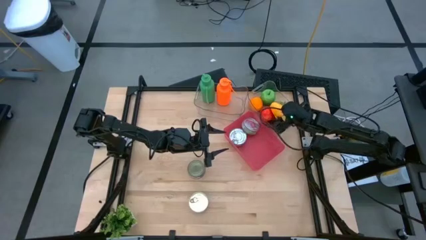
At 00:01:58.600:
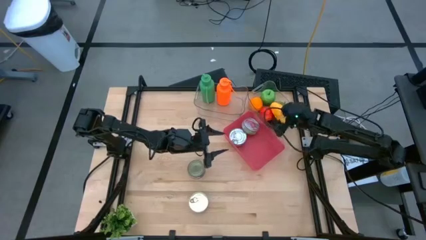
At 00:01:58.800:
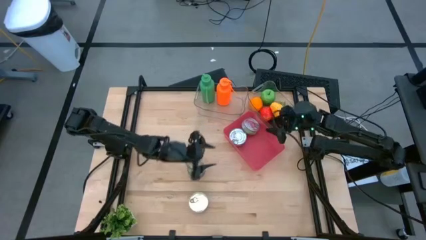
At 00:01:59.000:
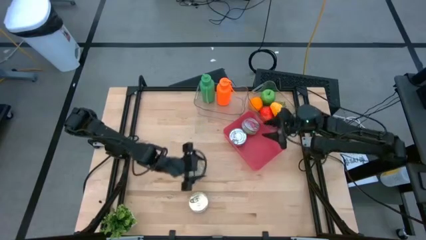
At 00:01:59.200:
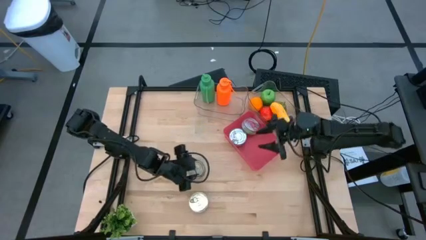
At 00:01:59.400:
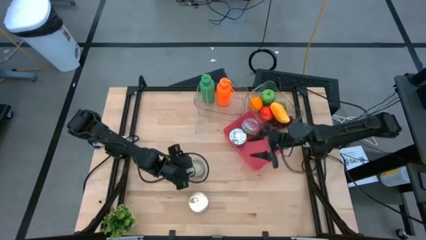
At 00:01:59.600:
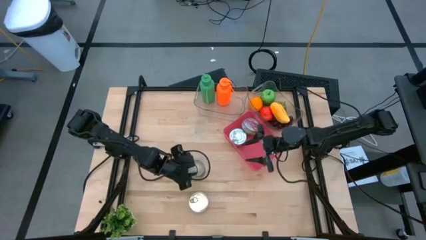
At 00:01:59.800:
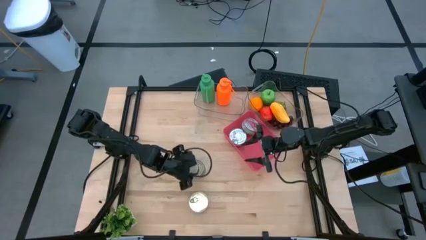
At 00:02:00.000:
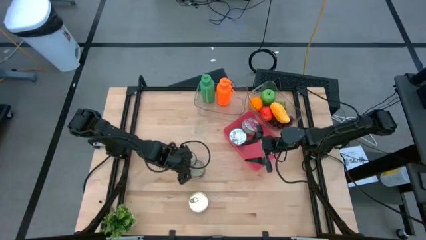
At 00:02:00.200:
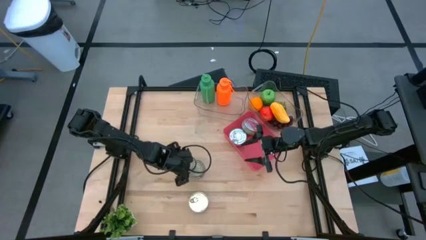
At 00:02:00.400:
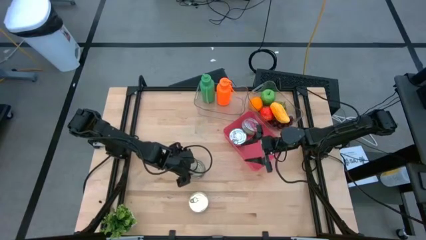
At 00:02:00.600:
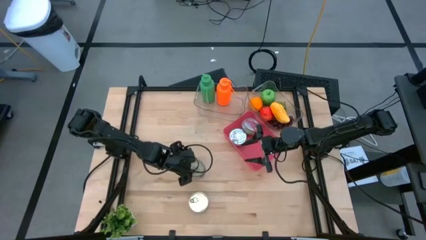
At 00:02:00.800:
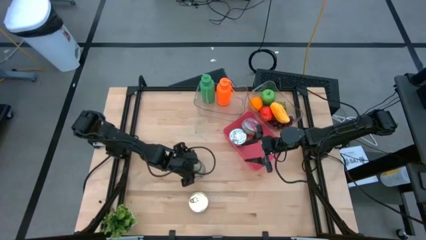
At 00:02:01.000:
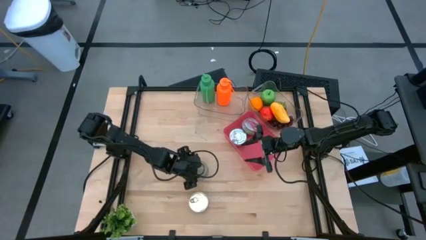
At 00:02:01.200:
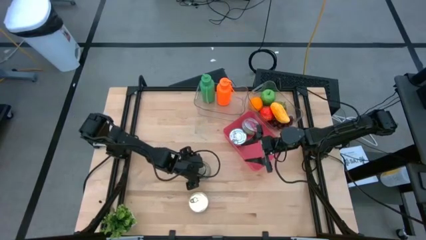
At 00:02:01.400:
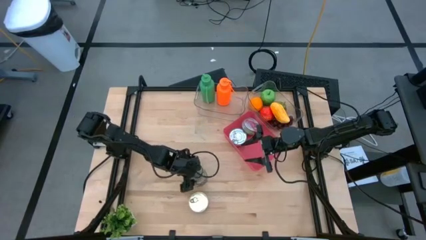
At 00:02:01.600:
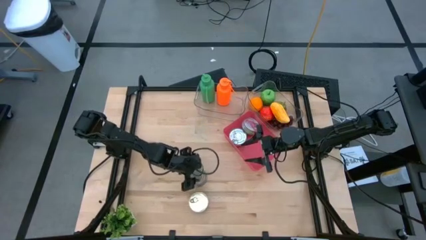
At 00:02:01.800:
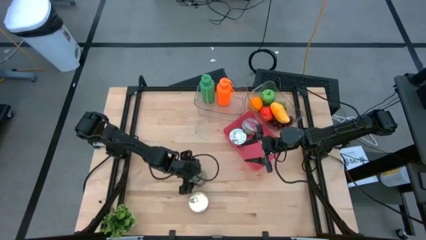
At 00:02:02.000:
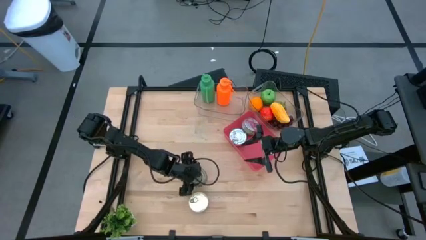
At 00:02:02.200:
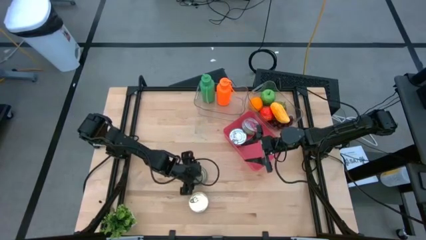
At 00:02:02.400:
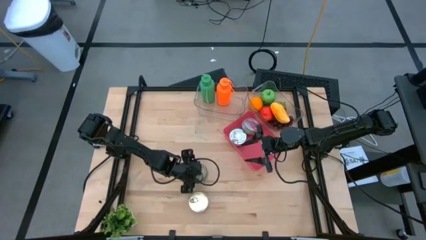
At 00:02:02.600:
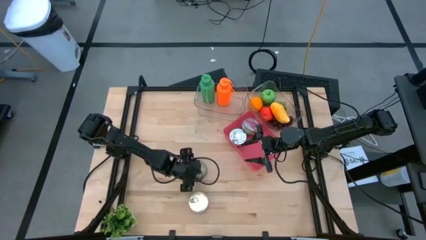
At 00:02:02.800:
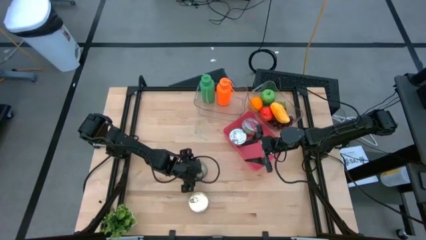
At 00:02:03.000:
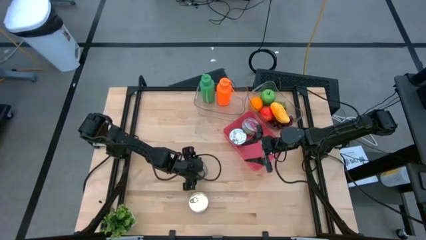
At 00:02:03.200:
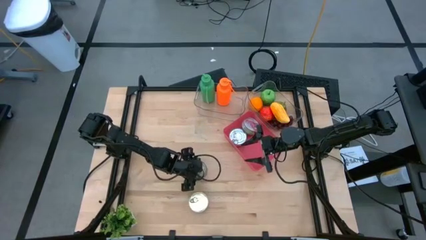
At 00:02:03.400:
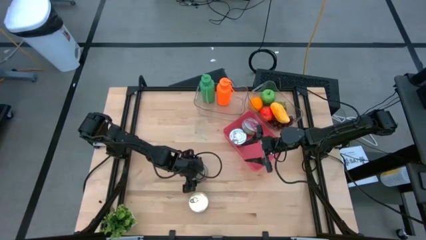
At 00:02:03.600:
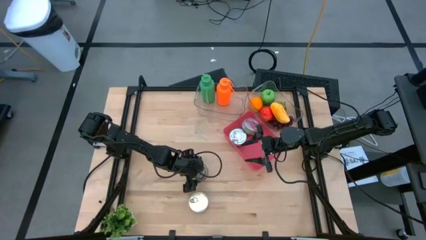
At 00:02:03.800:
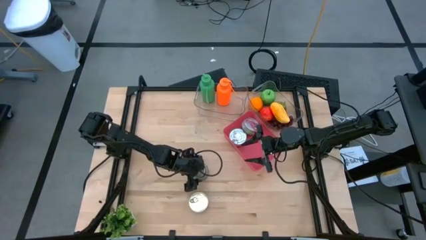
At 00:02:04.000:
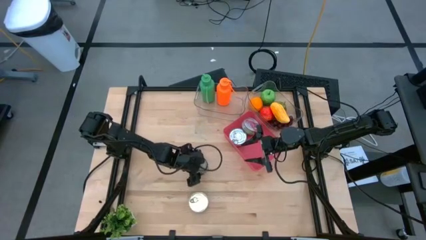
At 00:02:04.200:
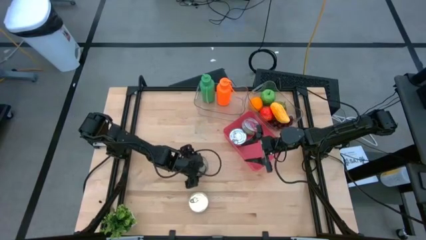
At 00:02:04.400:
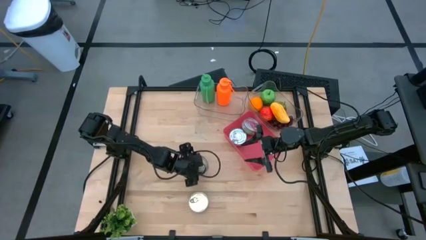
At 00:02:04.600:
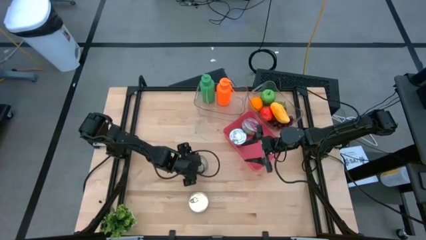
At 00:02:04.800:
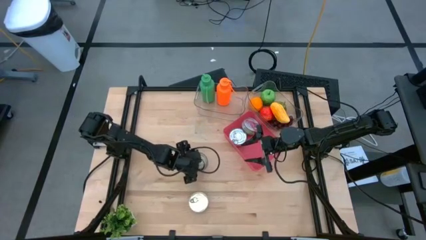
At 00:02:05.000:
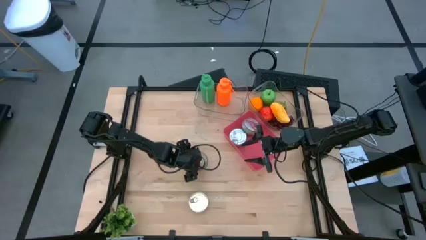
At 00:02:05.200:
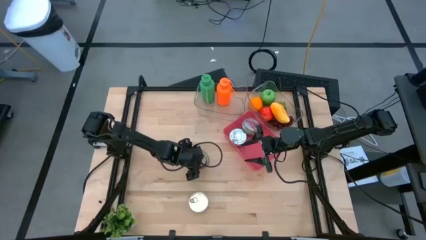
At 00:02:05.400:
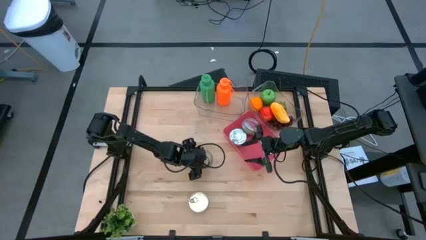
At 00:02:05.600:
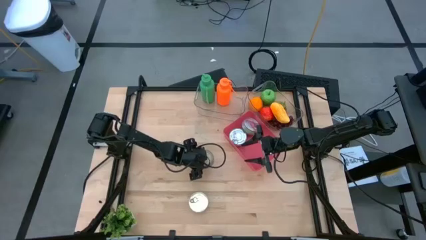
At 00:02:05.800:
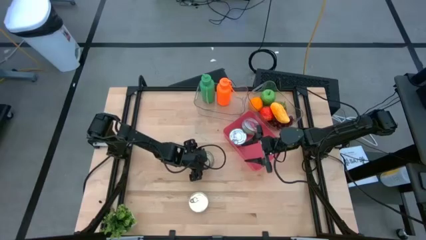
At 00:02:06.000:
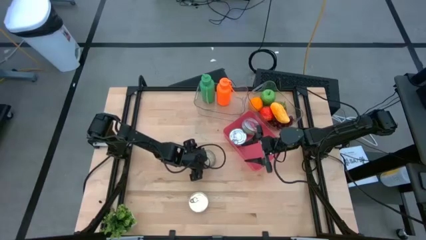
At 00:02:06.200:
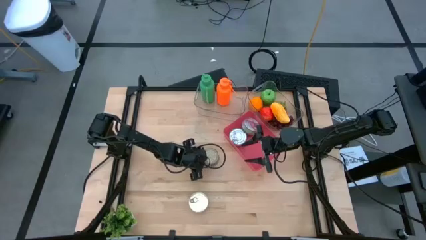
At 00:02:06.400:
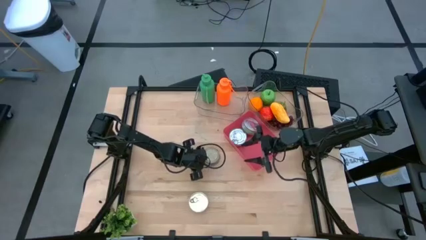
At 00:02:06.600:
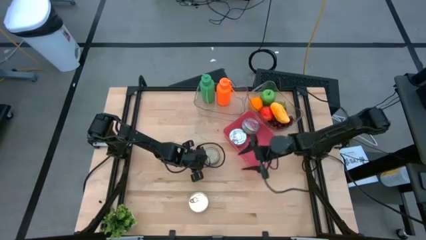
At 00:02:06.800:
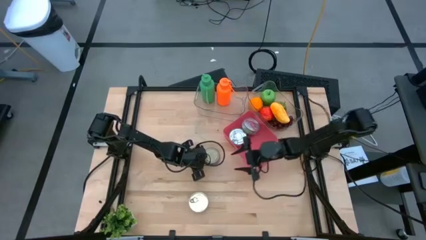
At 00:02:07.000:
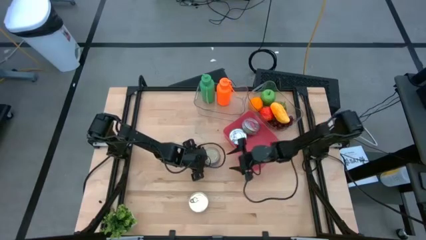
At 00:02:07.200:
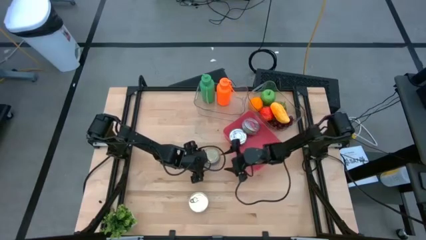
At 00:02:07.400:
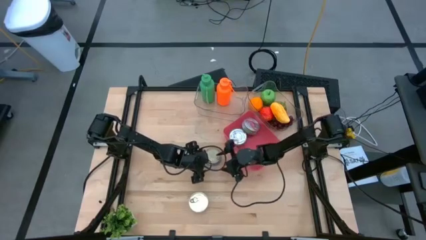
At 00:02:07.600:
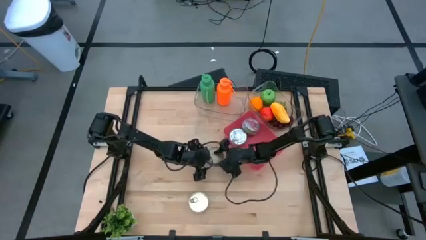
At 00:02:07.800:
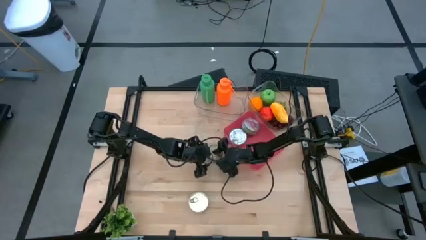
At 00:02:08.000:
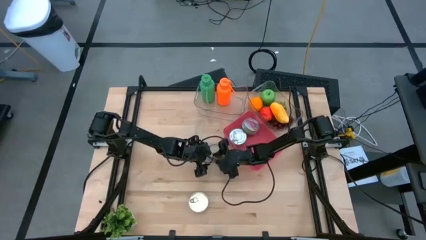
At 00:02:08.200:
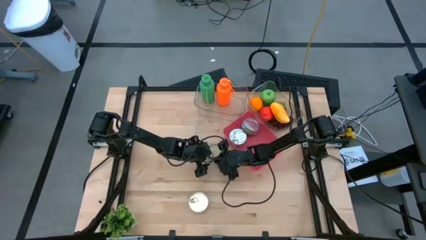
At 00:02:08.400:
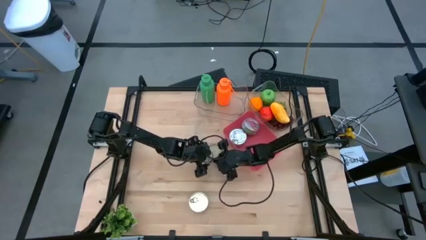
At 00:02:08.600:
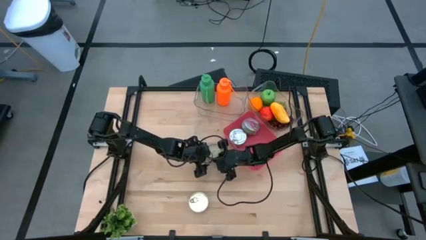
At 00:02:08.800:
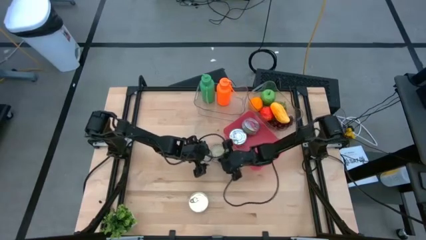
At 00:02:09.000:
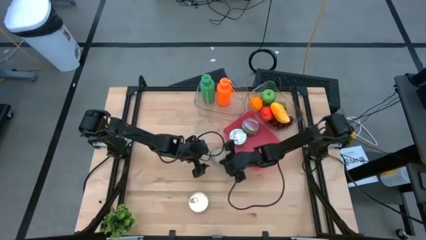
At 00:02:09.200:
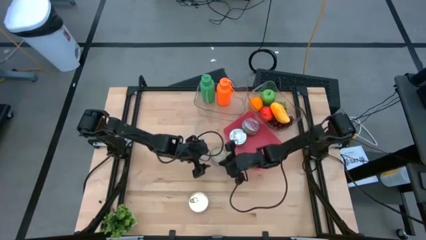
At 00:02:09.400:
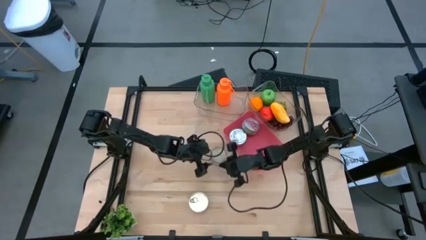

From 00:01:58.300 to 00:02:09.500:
Task: Pick & Place Food Item
Put the top blue and pink tuna can into the pink bin

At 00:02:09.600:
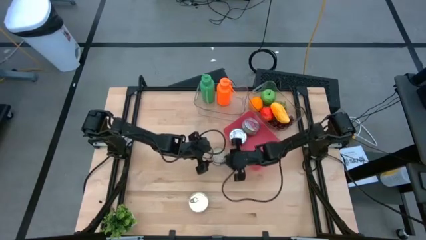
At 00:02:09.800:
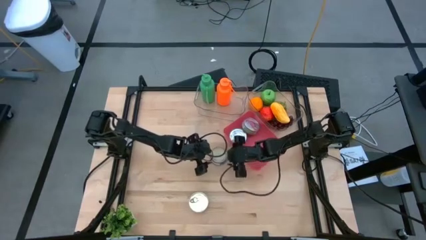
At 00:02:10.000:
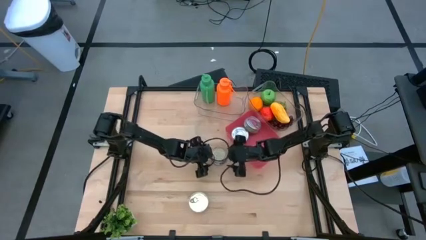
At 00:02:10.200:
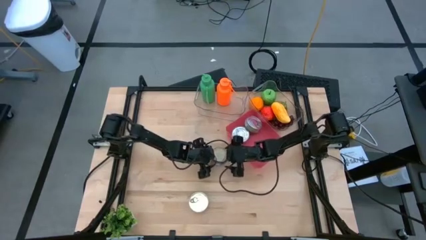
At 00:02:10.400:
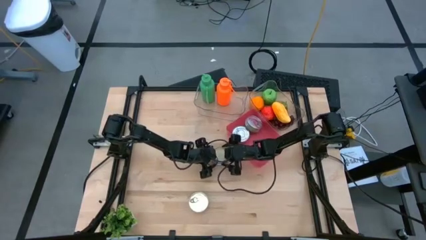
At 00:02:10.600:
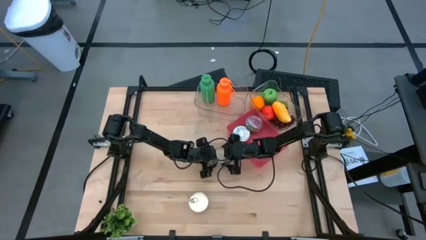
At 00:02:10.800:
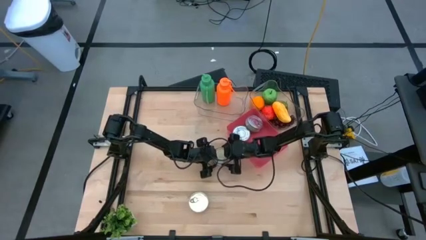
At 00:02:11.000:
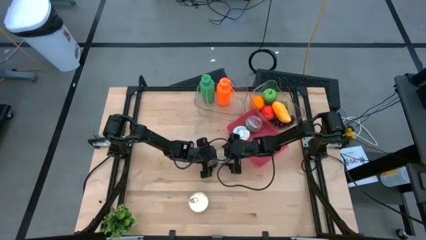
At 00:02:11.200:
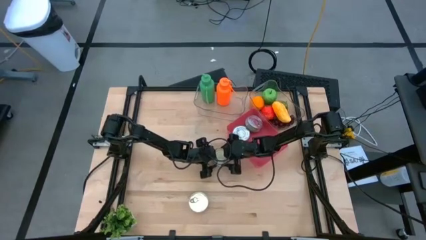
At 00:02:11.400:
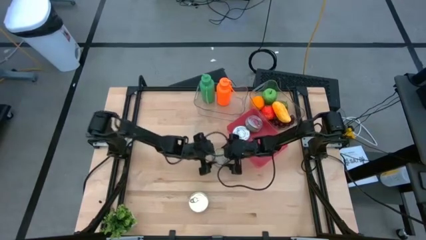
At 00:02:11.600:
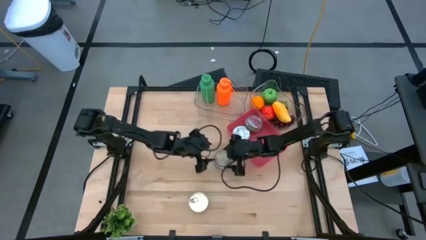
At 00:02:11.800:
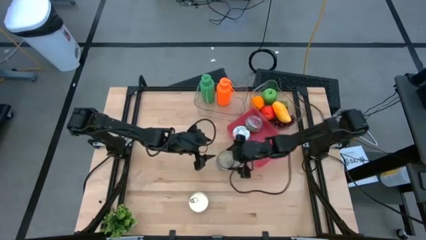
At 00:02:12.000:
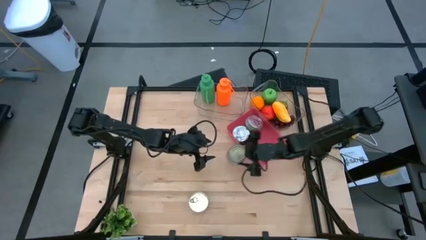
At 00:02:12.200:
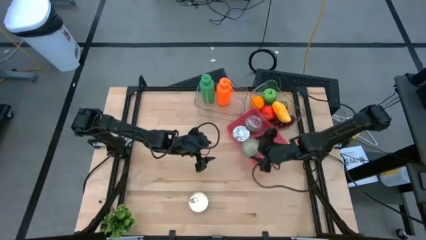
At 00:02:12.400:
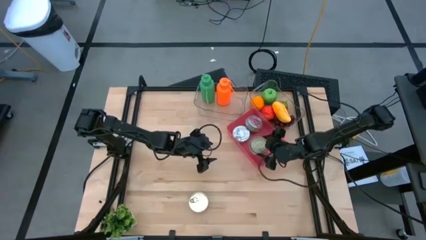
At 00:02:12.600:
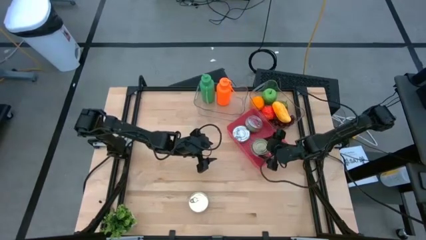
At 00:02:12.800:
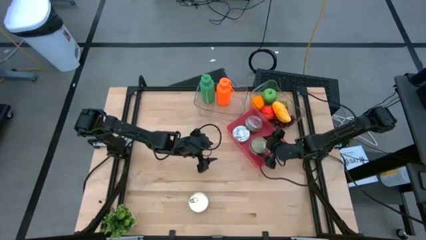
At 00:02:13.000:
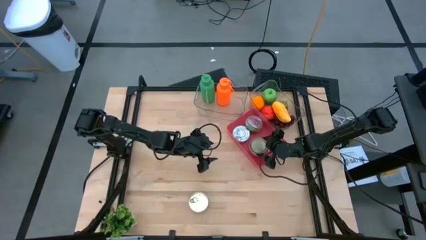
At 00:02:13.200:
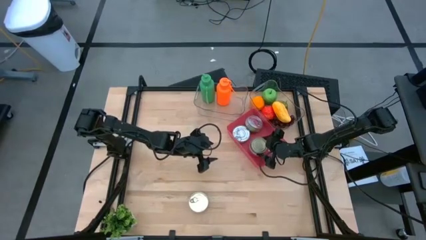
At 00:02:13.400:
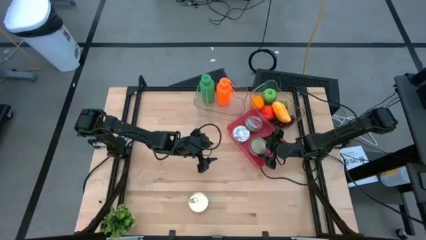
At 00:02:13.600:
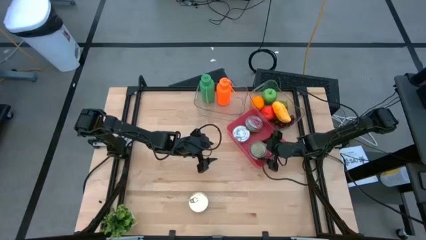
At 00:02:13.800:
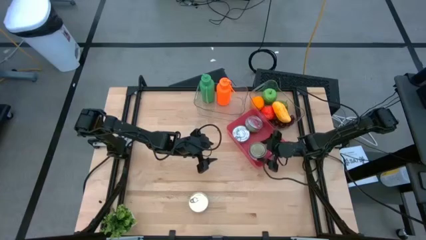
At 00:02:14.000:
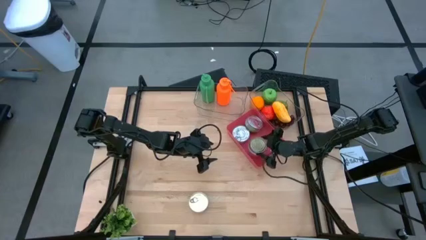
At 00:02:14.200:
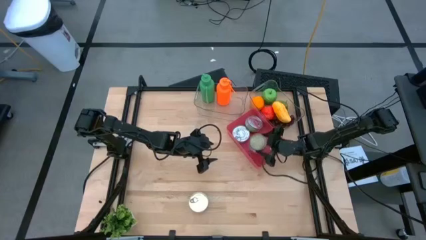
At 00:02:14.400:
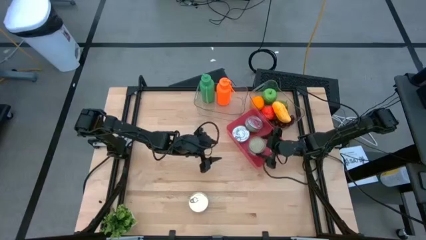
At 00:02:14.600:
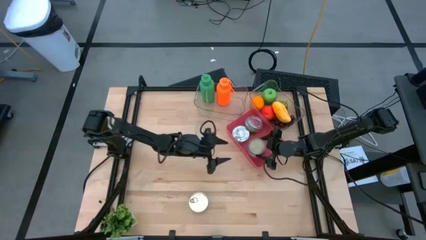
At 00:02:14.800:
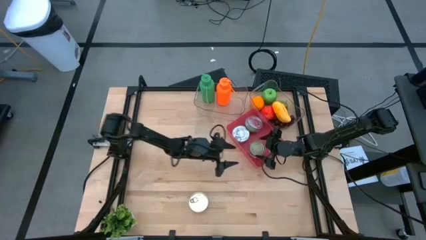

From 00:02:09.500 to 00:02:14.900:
Put the top blue and pink tuna can into the pink bin
